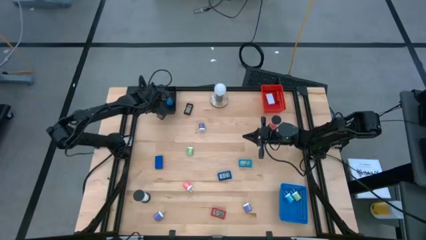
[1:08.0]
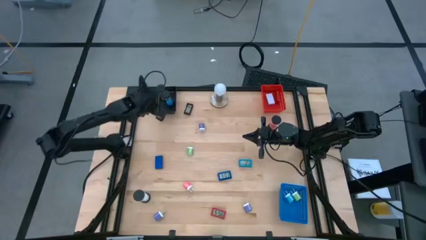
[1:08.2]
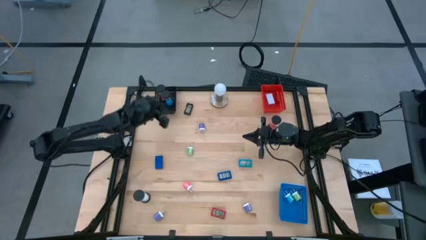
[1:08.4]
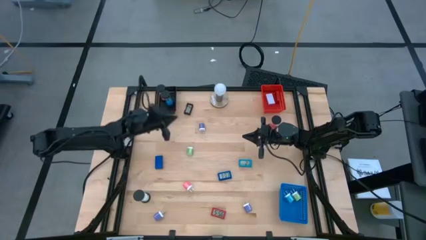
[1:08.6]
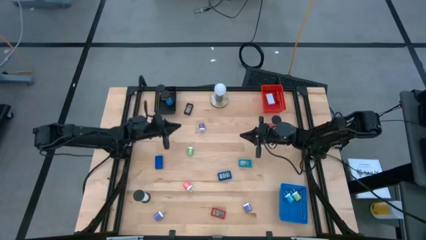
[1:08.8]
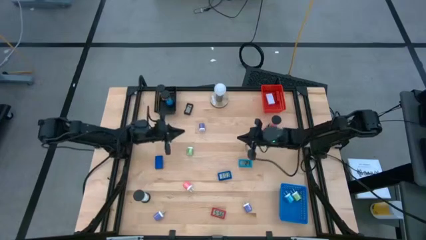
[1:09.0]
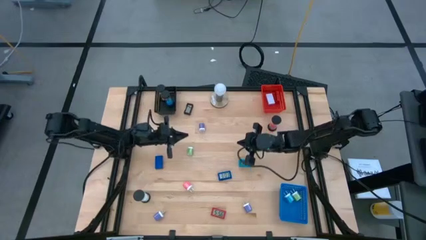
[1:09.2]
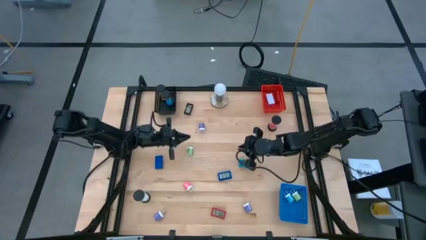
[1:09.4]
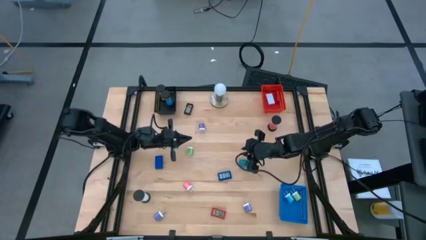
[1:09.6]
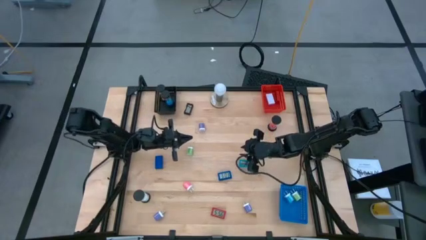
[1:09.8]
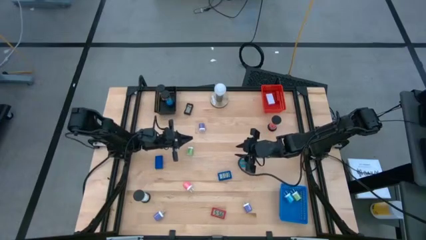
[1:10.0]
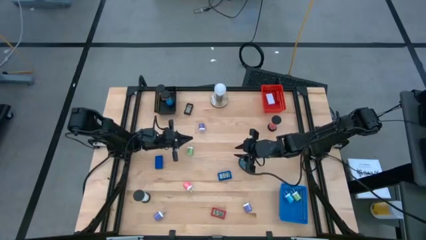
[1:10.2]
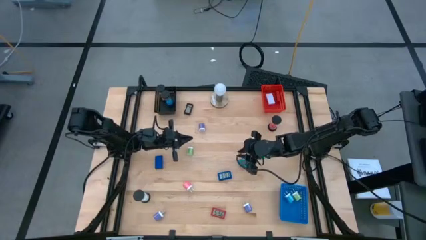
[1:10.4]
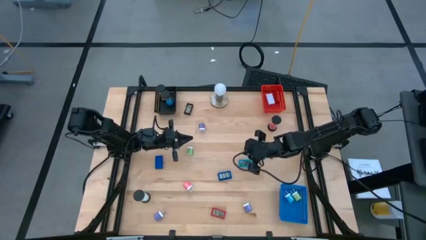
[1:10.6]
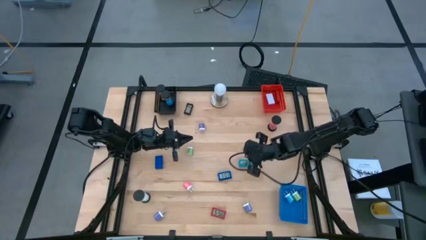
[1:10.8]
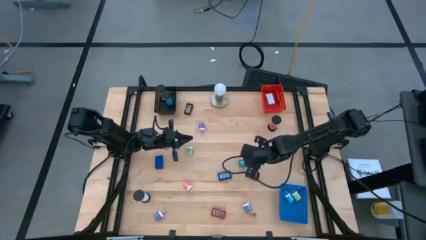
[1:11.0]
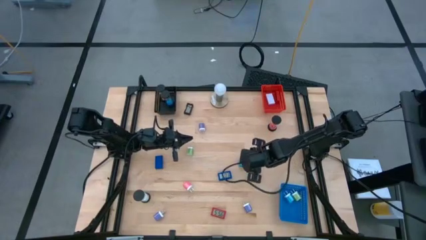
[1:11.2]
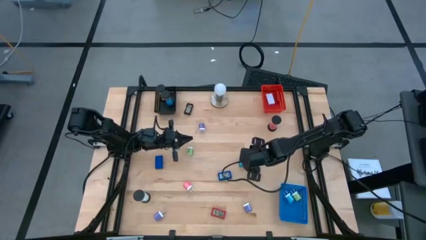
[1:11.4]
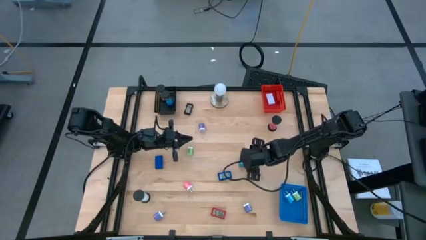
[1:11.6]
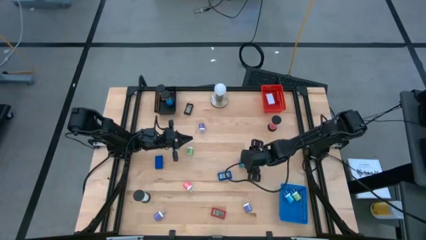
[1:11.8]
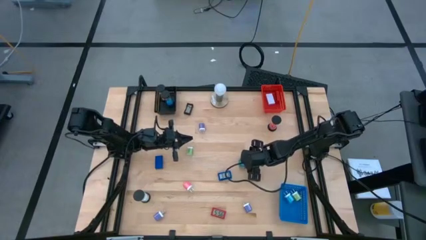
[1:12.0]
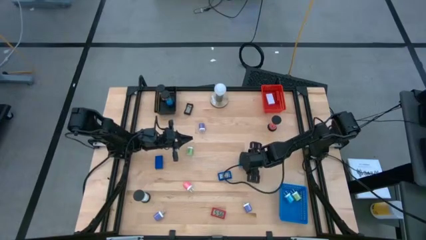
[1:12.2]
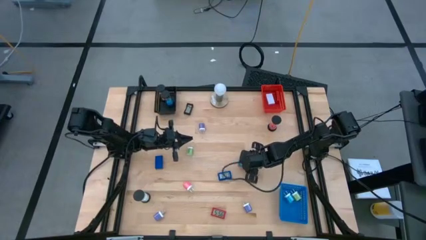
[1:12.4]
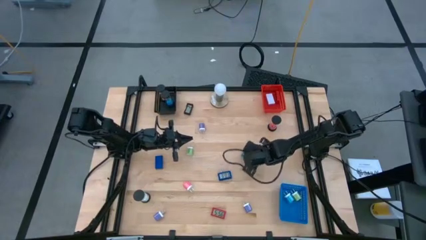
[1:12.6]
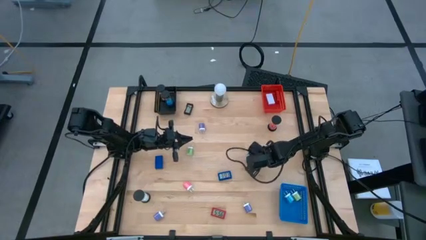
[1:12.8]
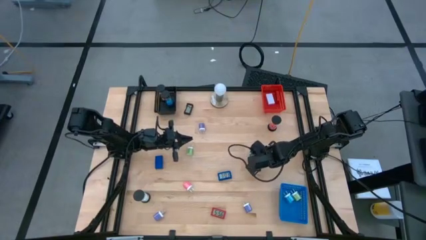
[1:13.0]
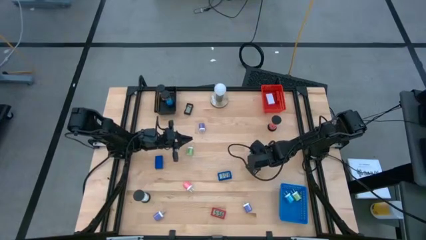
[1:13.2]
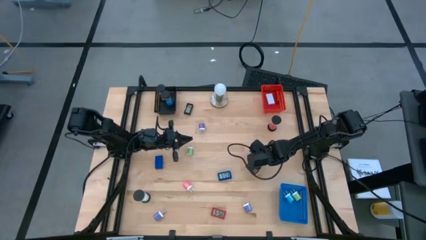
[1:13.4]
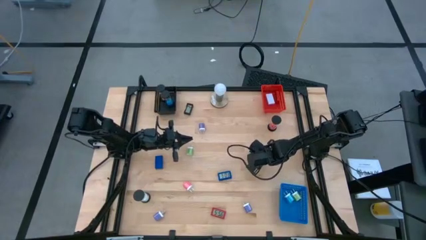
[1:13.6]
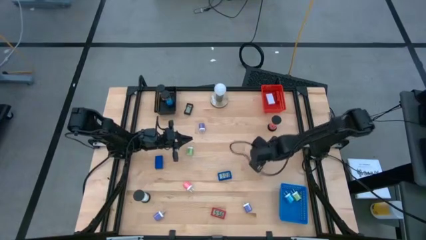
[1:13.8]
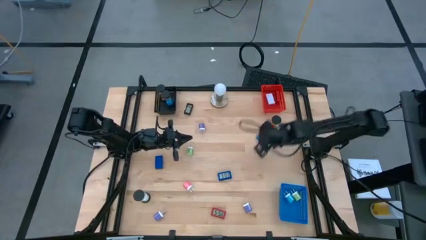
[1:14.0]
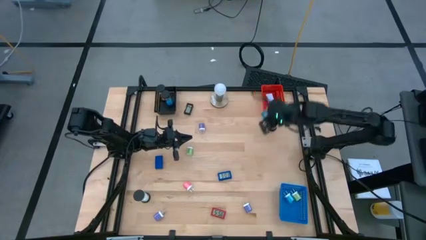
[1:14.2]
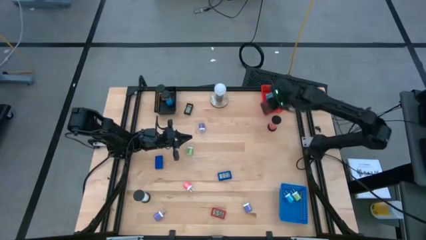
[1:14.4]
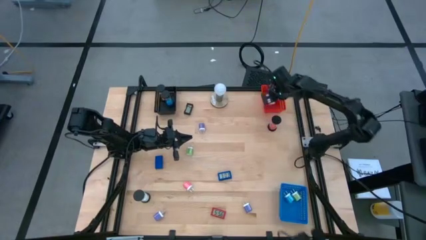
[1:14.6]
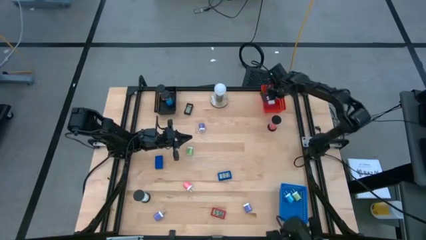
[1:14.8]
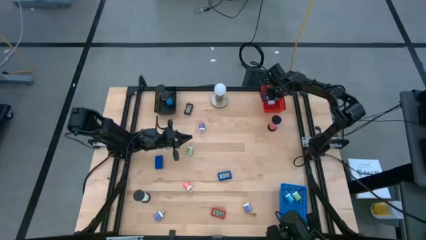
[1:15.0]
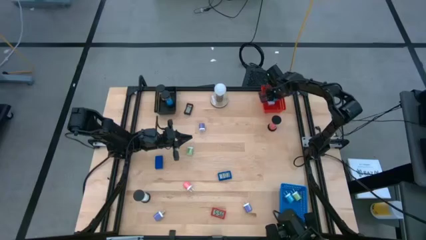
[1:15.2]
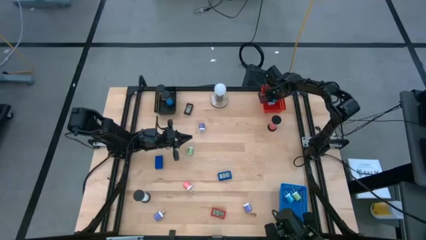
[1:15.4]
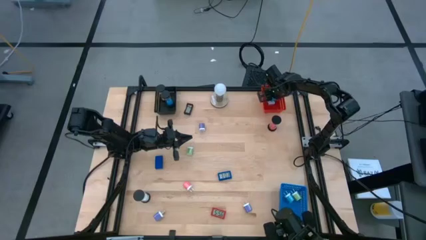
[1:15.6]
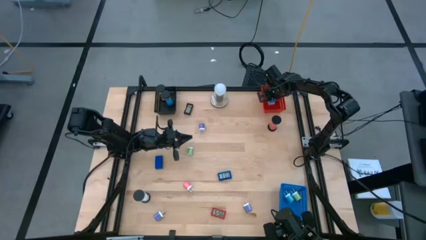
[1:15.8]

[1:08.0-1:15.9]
Task: Pick & Place Office items
Put the light blue digital clock in the red bin

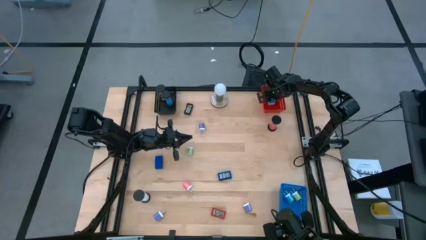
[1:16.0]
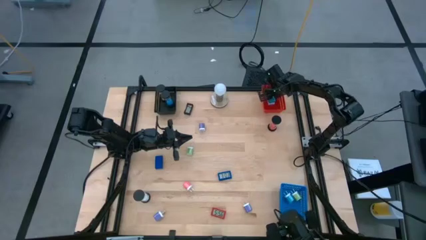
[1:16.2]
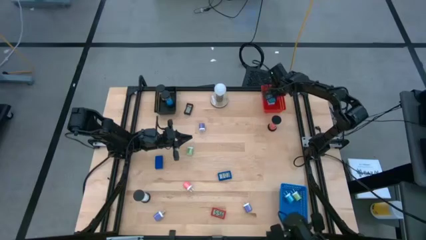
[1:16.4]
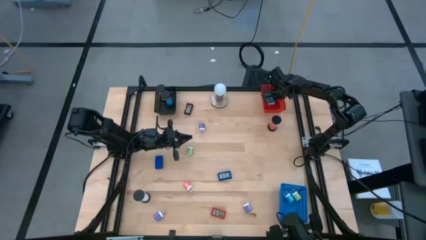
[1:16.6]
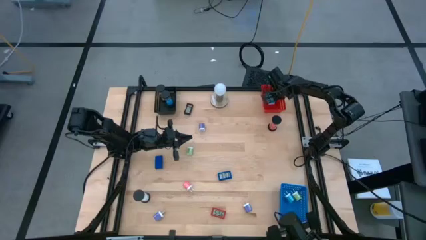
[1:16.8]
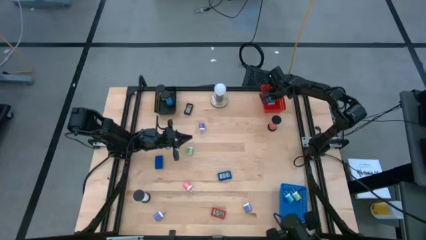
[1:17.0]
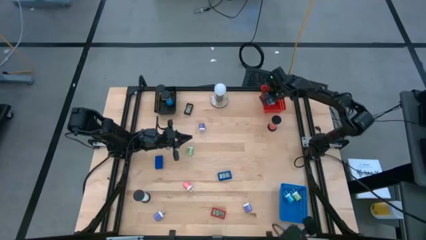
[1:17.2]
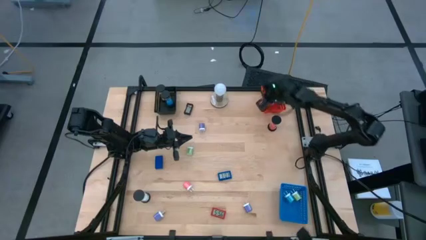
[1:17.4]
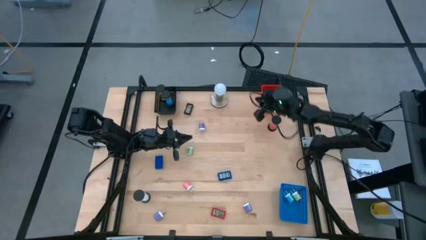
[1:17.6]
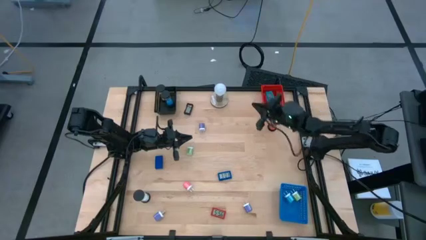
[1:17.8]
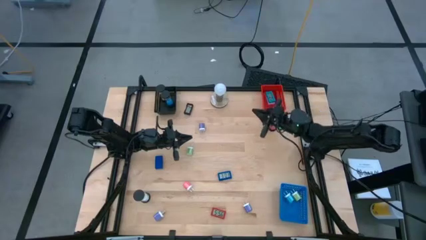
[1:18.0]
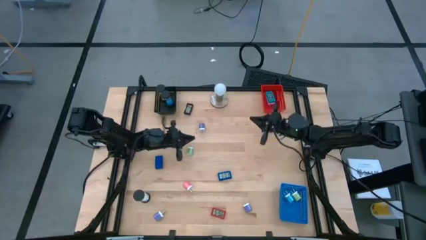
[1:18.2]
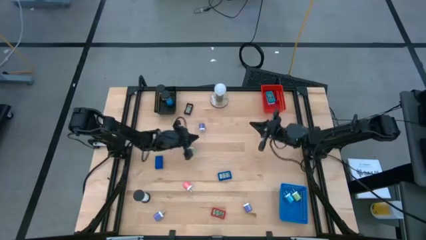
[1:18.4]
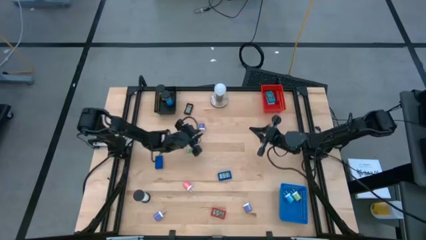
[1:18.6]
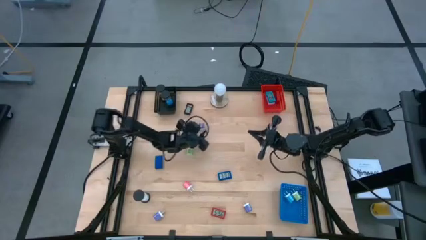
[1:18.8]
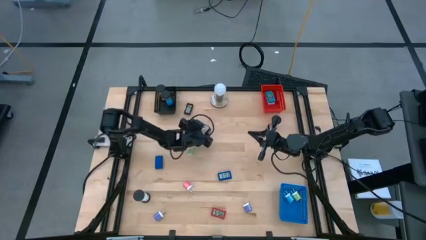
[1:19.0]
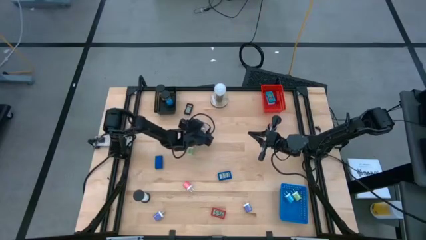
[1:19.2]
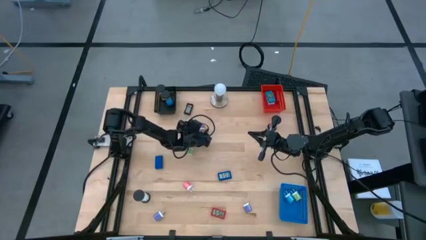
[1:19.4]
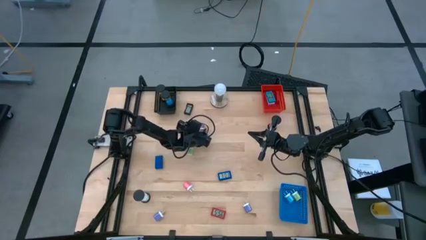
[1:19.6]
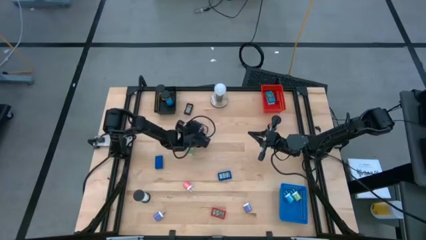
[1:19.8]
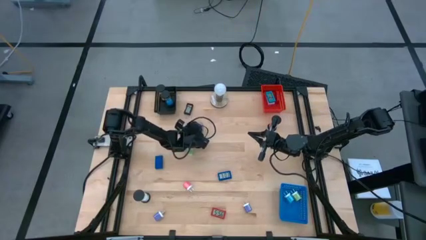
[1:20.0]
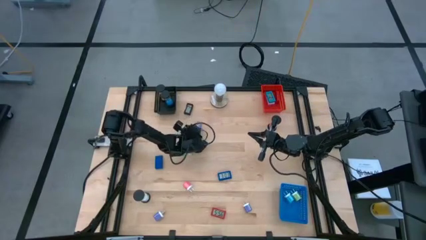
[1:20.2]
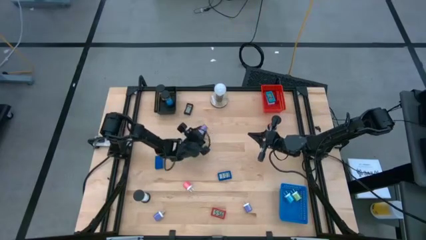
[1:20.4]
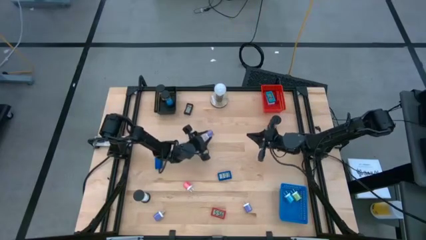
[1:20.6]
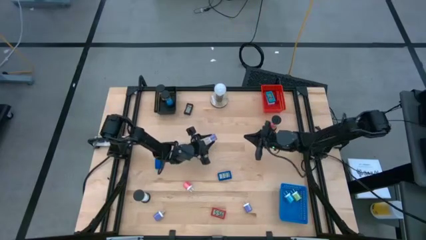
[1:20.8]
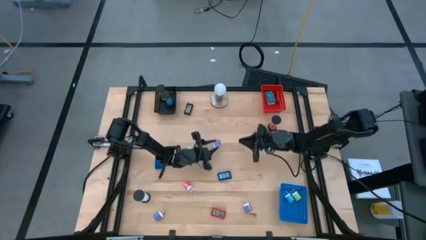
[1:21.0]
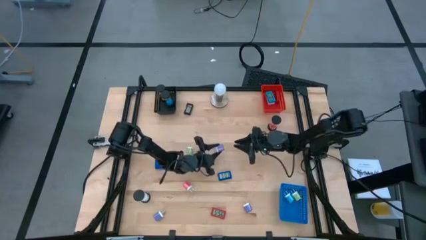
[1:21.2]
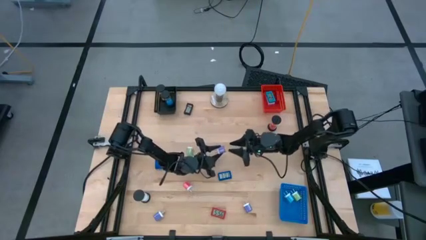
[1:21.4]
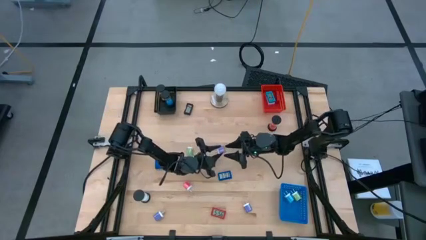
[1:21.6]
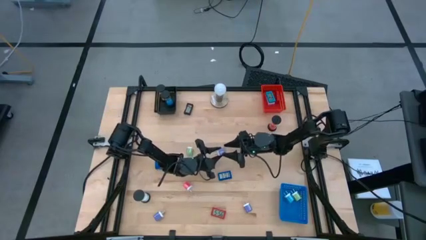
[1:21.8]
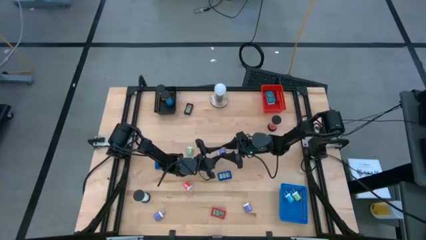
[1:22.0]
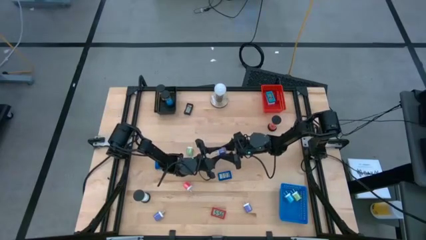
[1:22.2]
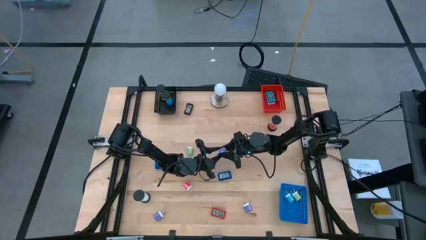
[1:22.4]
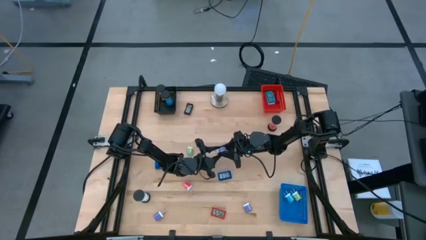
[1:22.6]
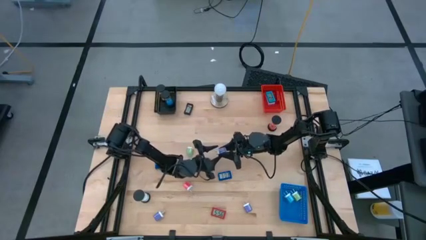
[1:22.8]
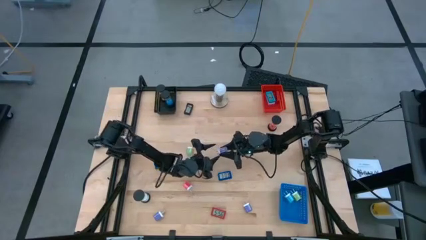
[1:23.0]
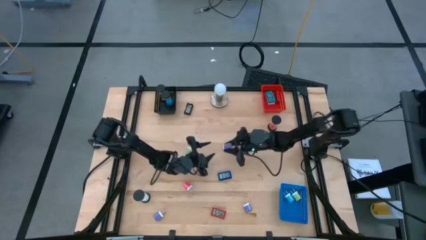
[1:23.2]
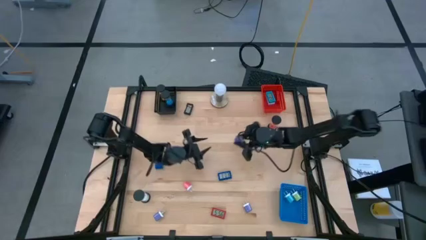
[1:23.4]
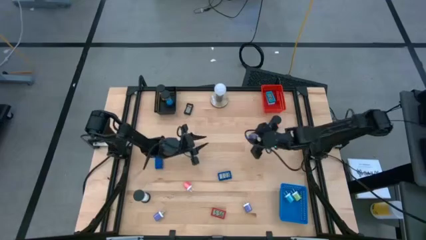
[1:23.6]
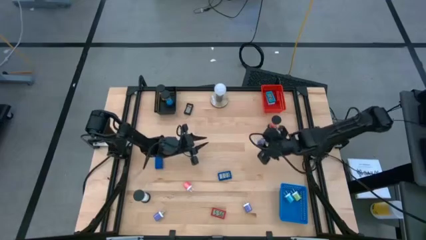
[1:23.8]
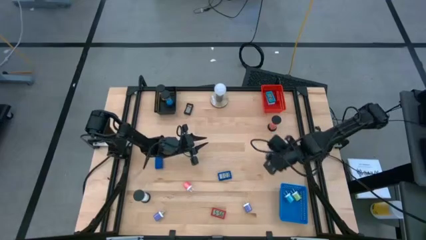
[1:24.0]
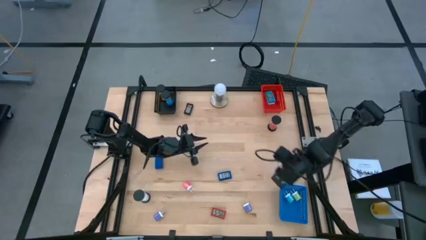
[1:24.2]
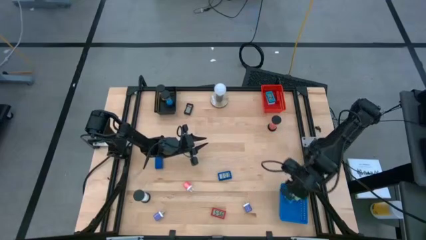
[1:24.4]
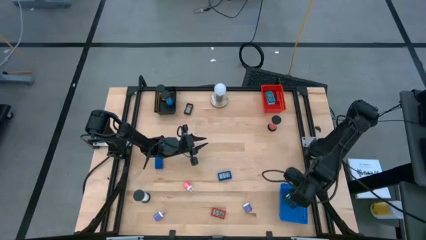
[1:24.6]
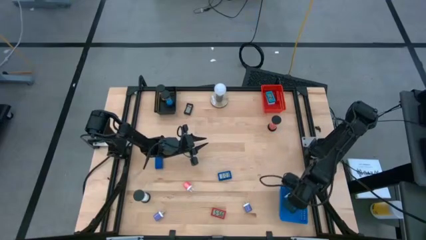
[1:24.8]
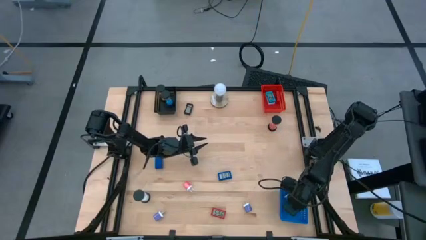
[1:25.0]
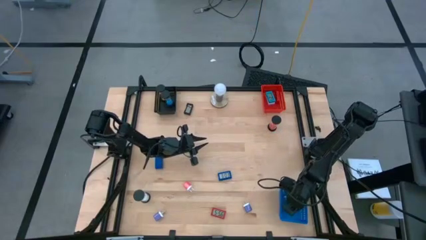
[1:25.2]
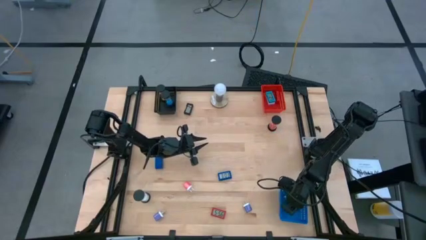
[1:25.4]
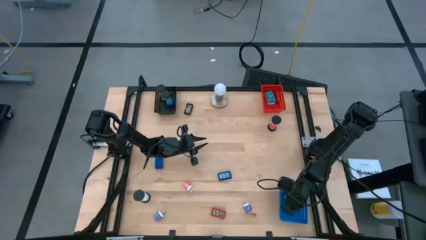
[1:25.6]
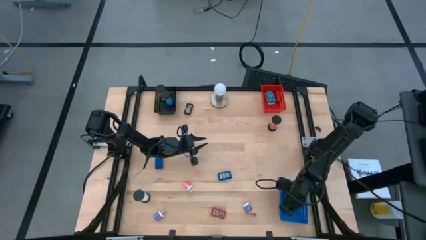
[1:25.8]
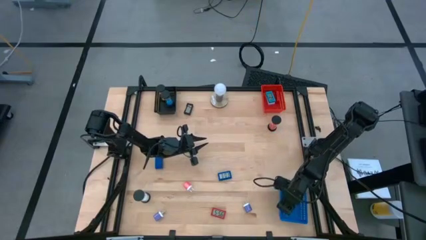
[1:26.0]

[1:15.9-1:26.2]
Put the top violet charger adapter into the blue bin
